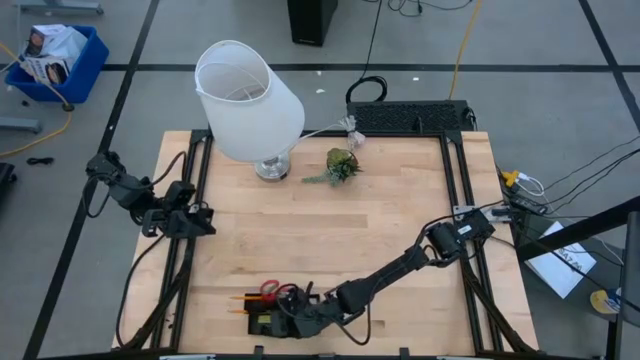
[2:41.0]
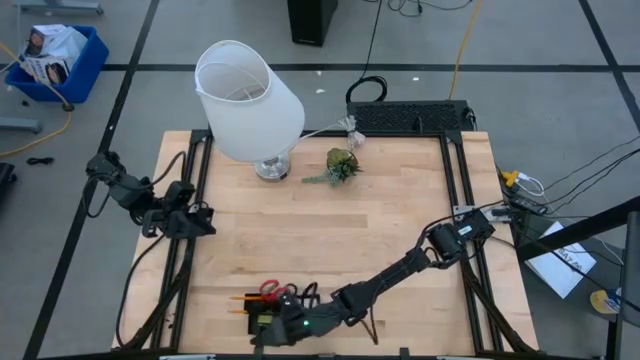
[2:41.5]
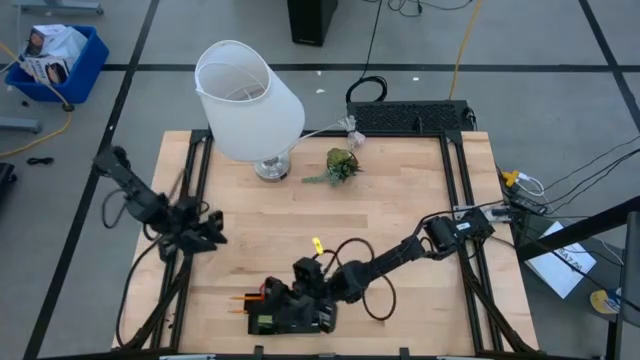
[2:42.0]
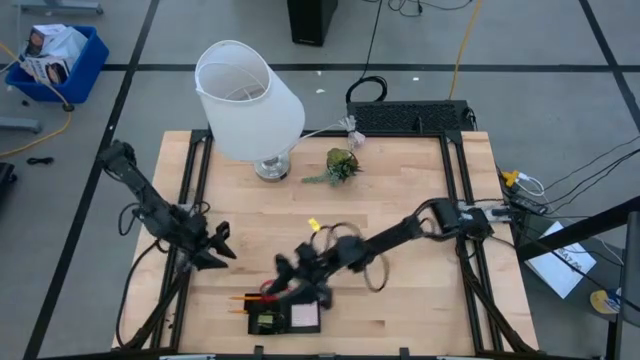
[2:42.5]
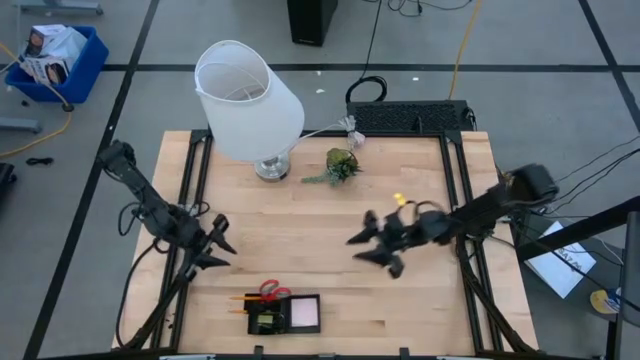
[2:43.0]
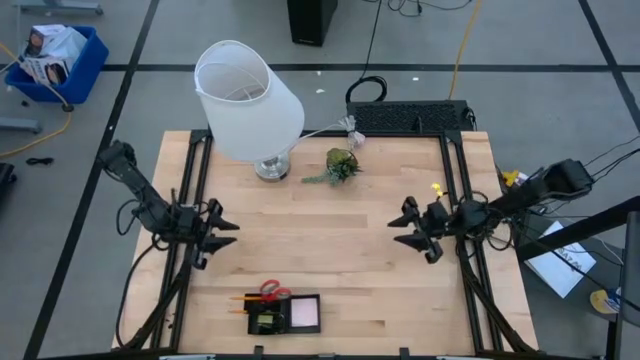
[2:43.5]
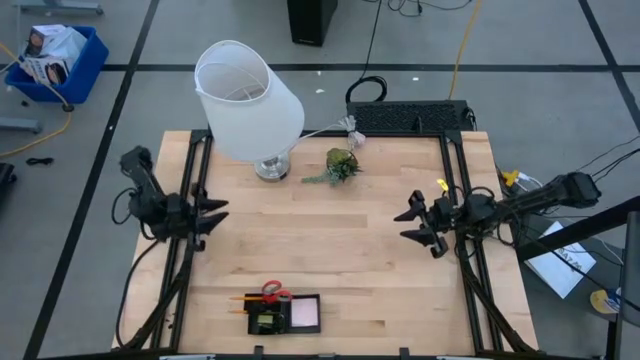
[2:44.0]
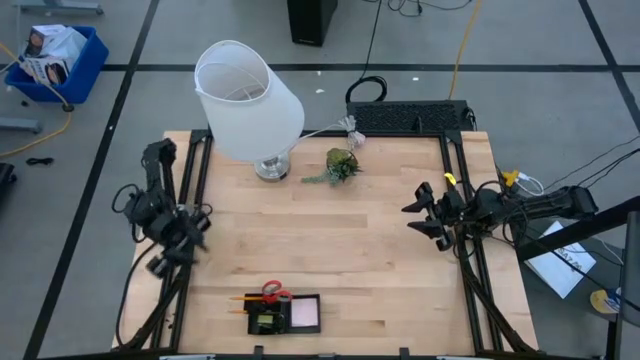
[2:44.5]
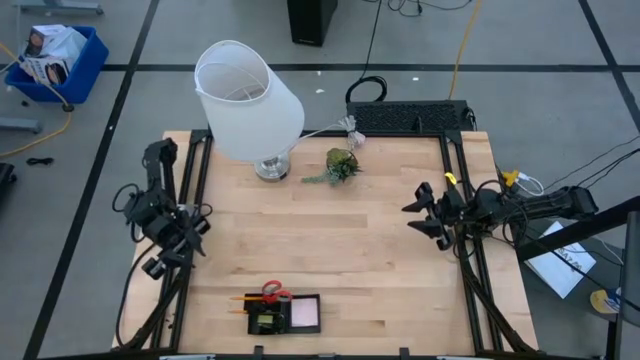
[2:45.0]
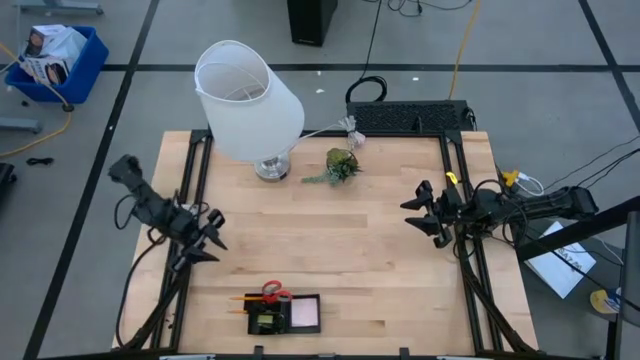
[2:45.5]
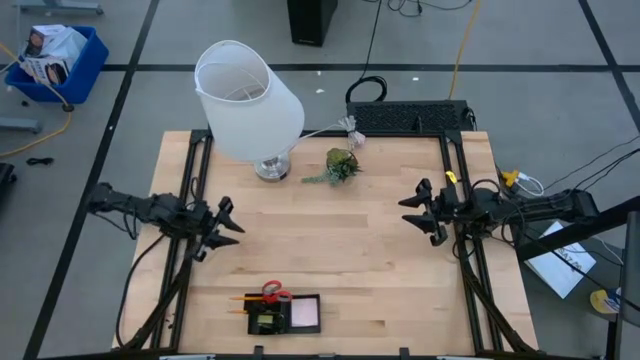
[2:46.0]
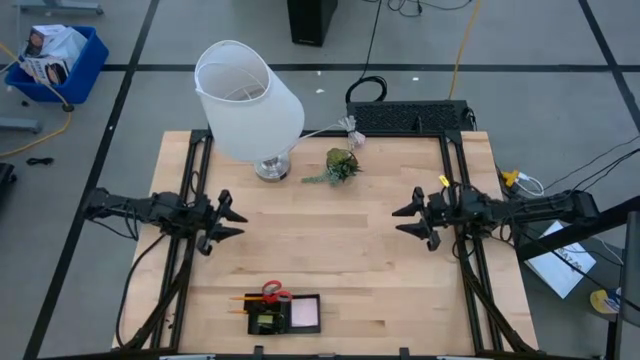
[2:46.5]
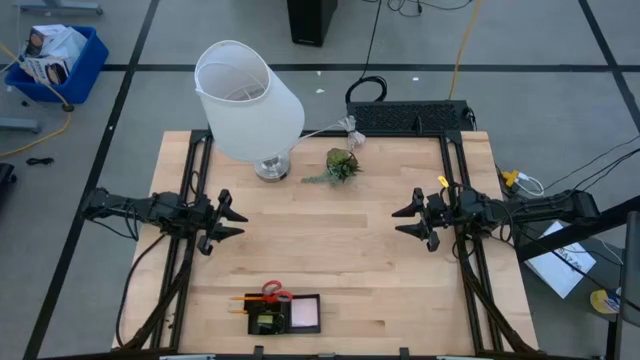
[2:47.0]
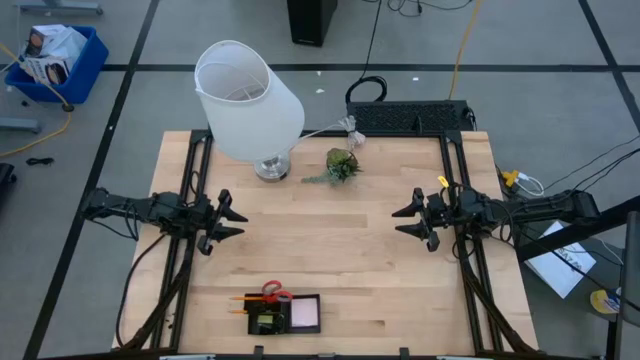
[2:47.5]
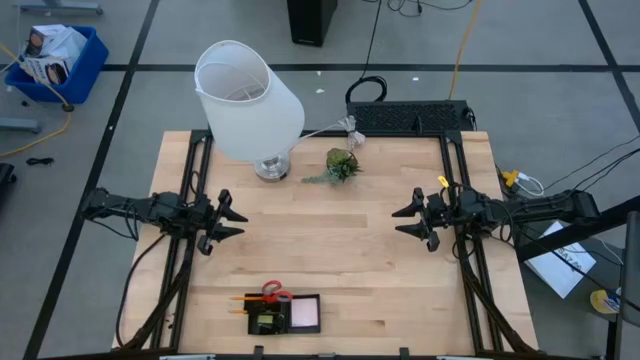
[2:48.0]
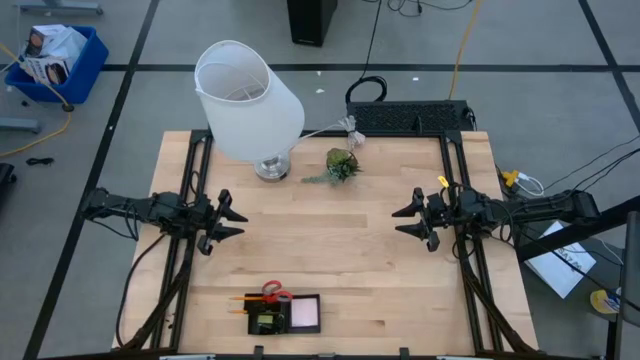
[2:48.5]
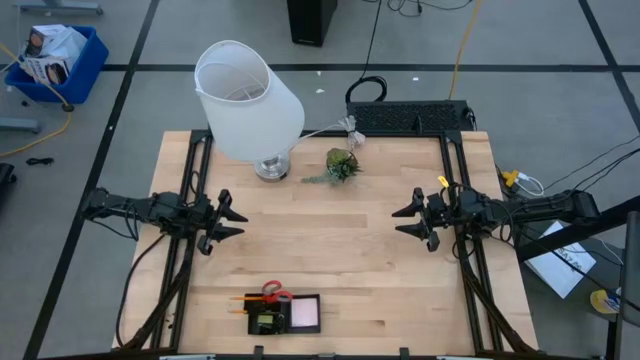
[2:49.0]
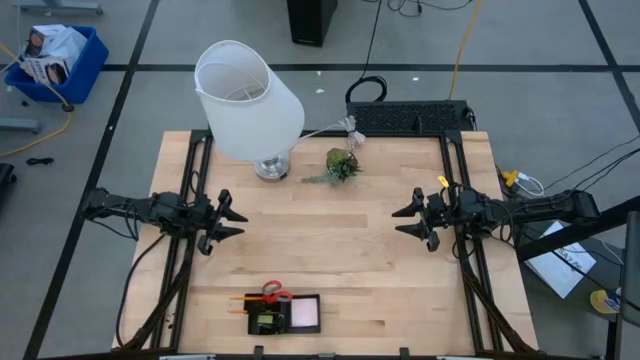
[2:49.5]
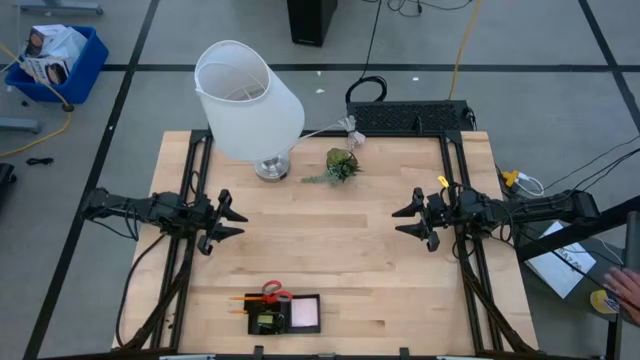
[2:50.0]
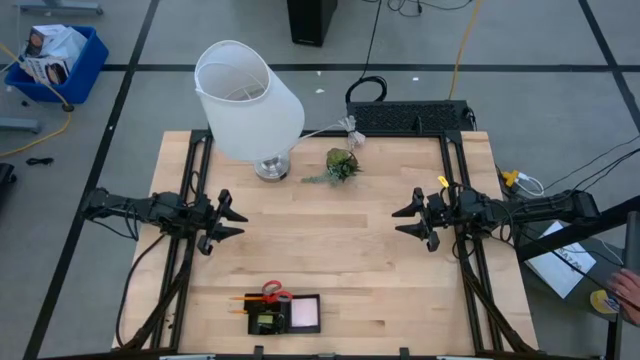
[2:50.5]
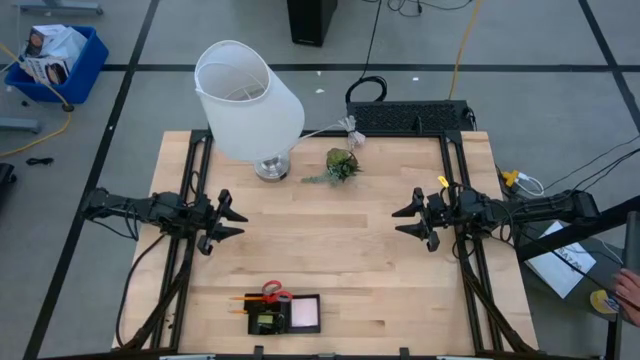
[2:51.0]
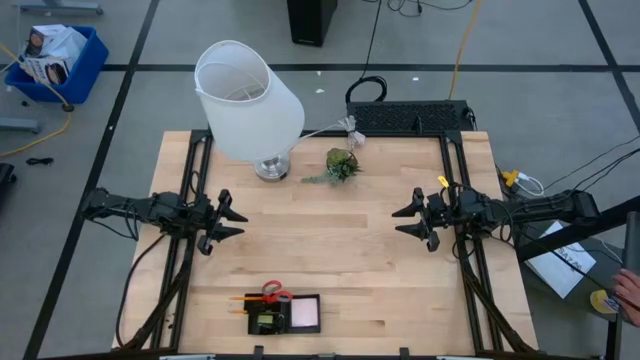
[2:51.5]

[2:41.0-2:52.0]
Task: Pick and place office supplies into organizer
Return to Home Position

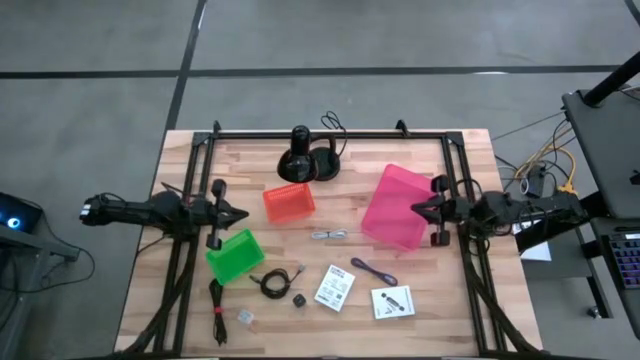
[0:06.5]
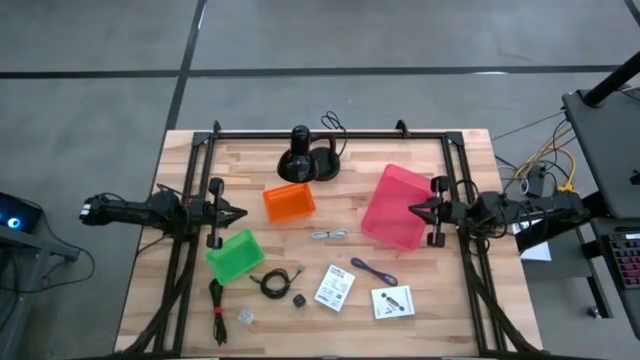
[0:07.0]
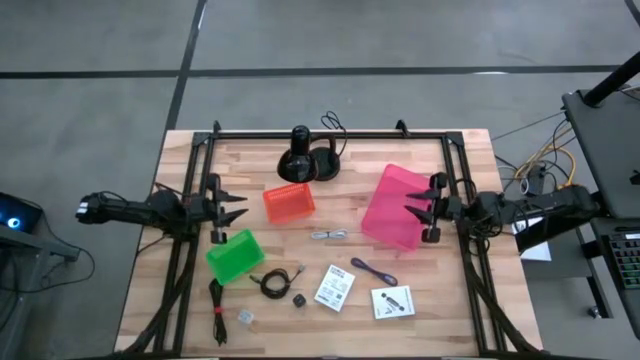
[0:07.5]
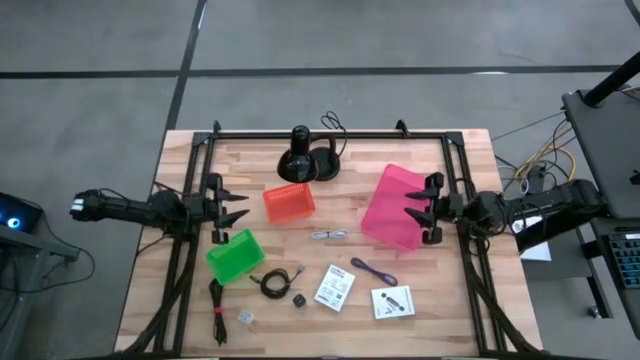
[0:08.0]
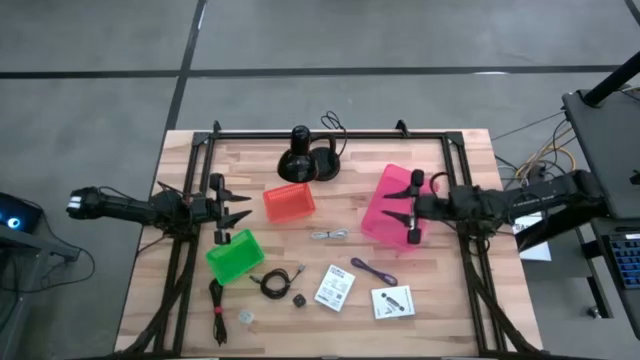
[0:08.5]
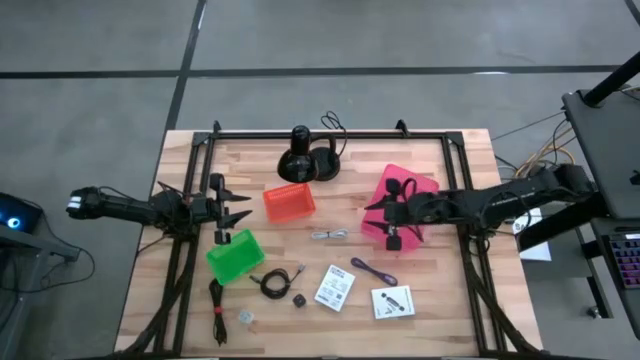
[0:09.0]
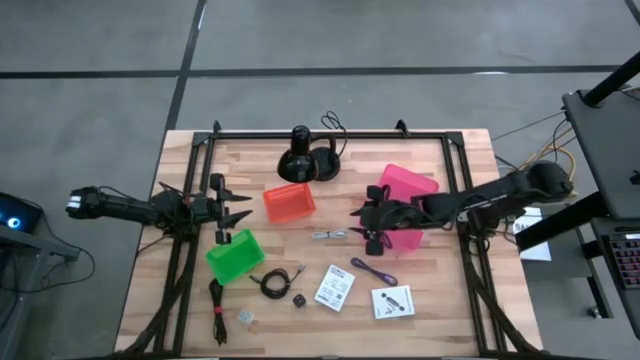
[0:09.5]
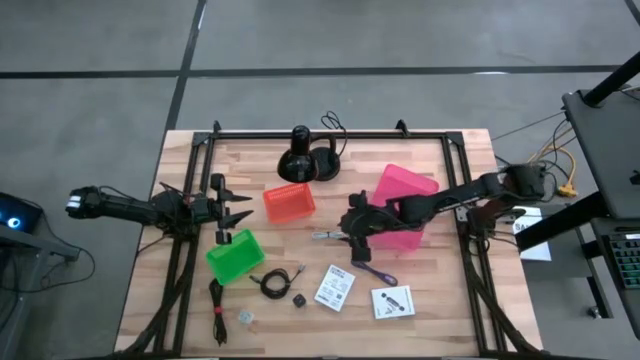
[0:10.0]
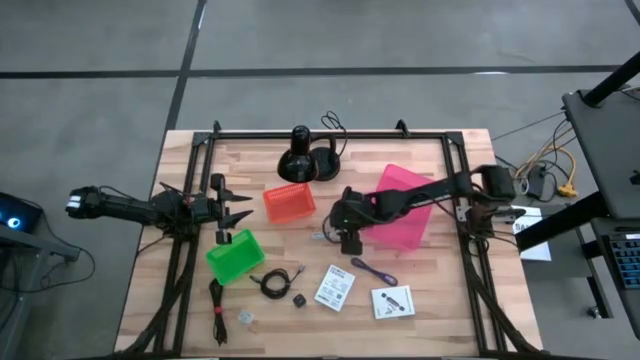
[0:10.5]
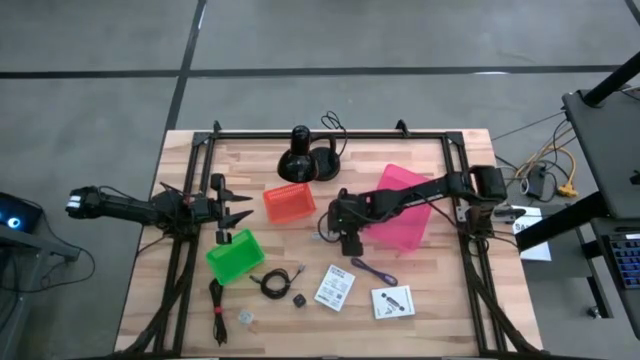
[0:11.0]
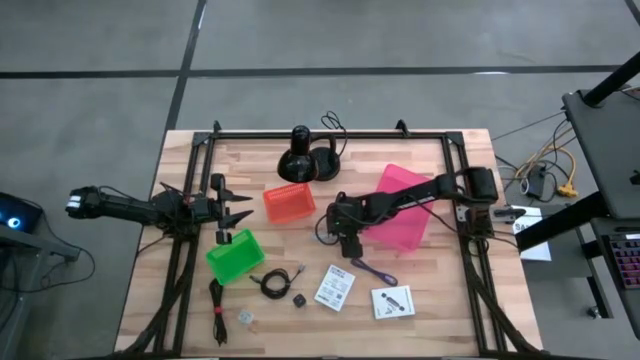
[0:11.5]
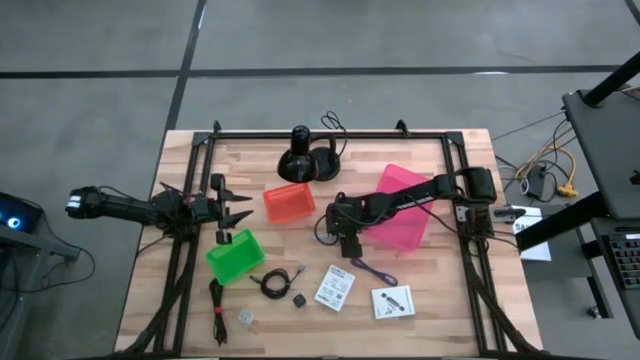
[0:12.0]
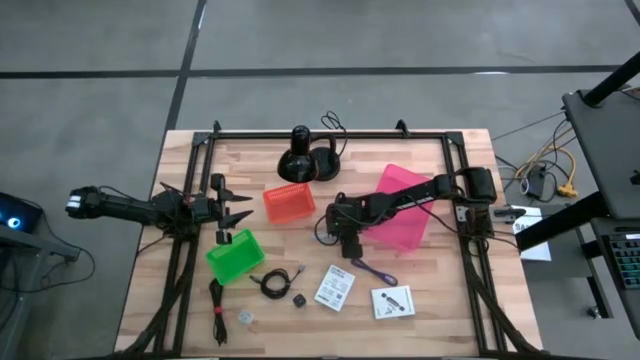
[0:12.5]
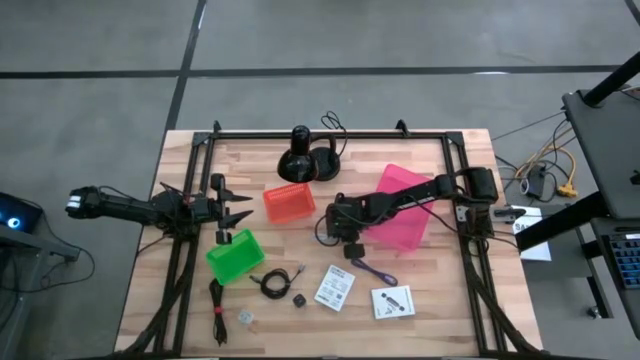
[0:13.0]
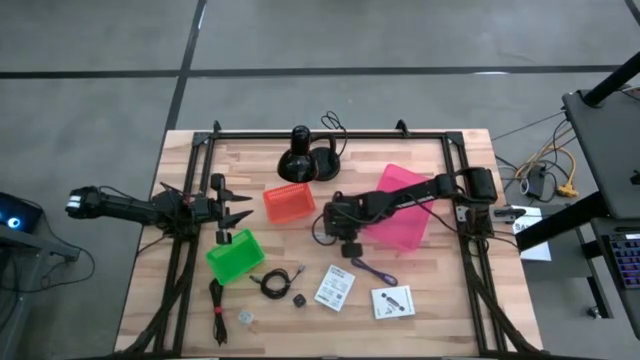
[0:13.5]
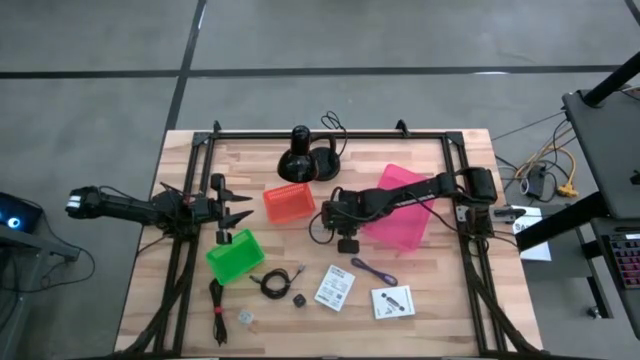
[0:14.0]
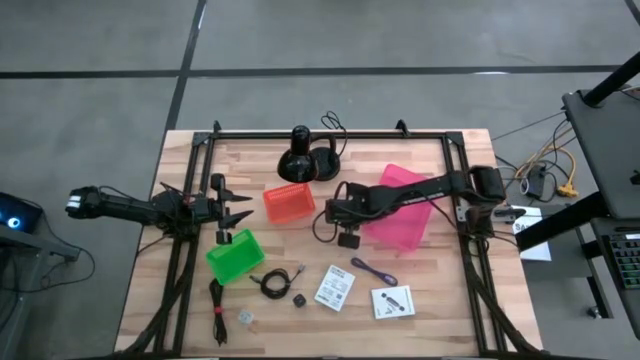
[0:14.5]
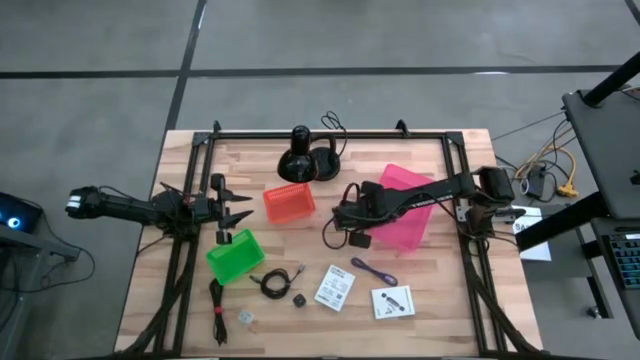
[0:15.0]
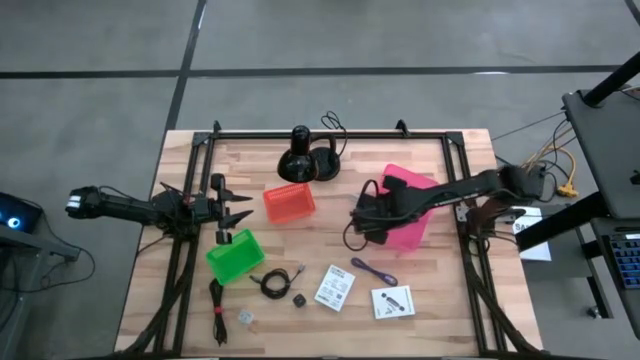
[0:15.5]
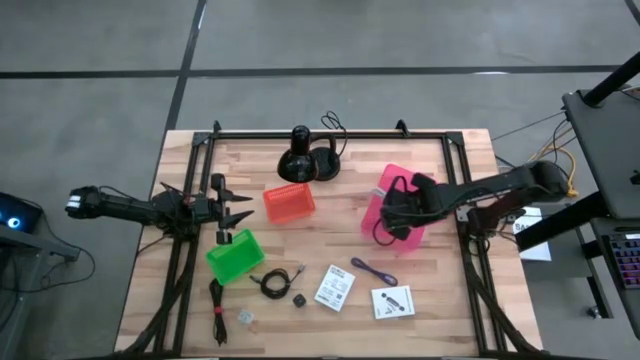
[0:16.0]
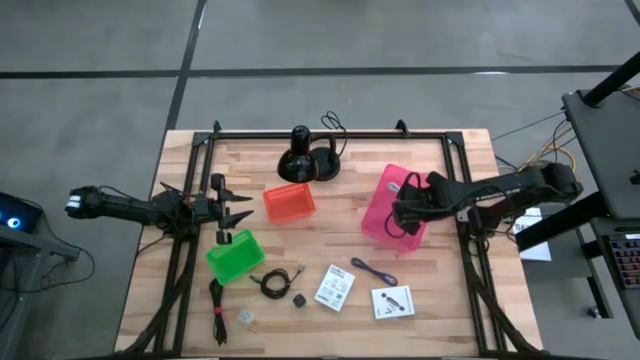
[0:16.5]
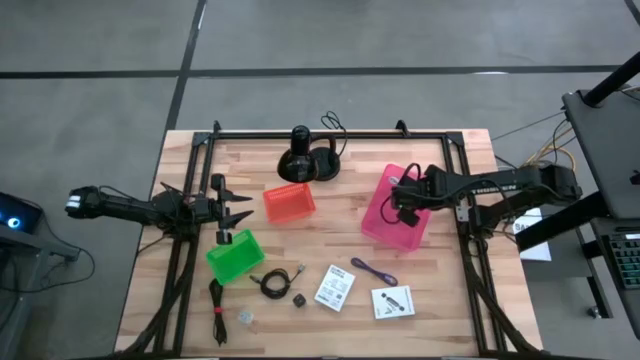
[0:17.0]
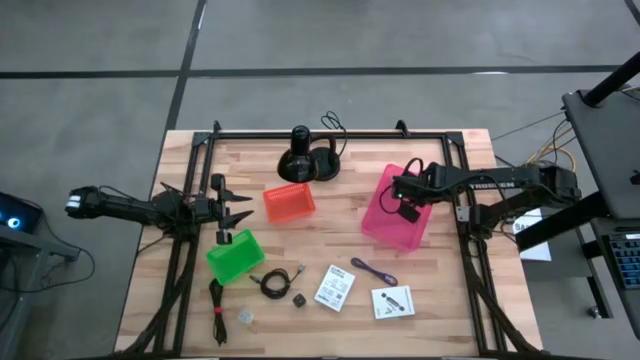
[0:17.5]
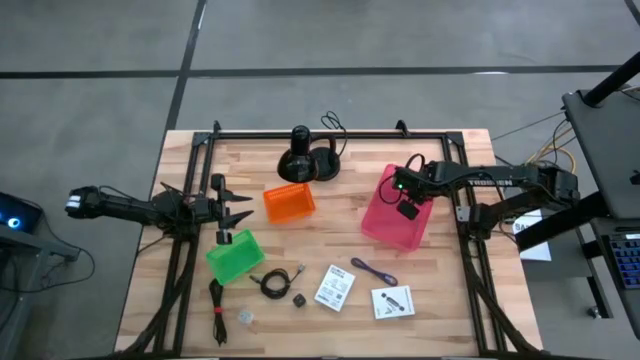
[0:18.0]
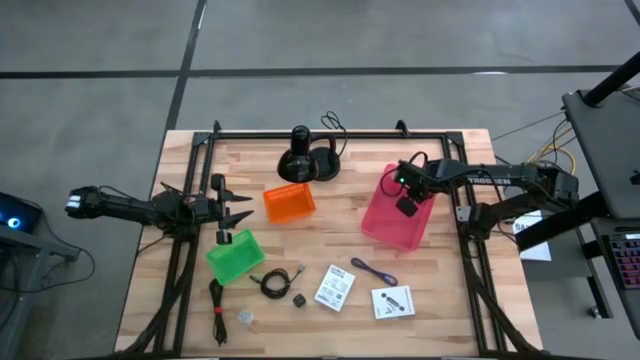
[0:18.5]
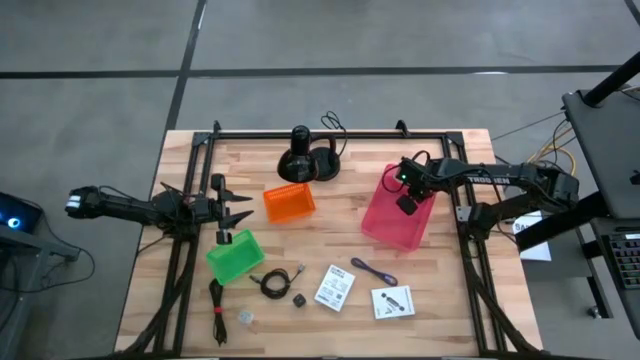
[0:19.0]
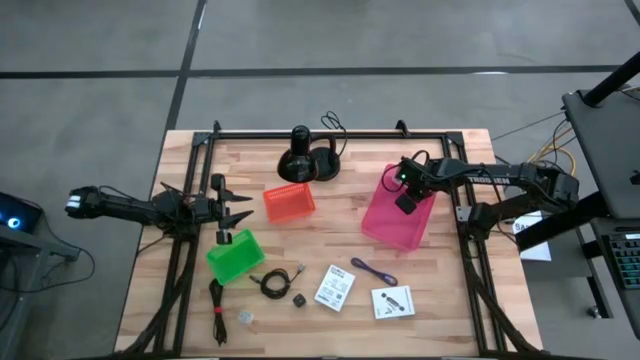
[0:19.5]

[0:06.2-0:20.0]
Task: Pick and place items into bin
Put the white charger cable into the pink bin
